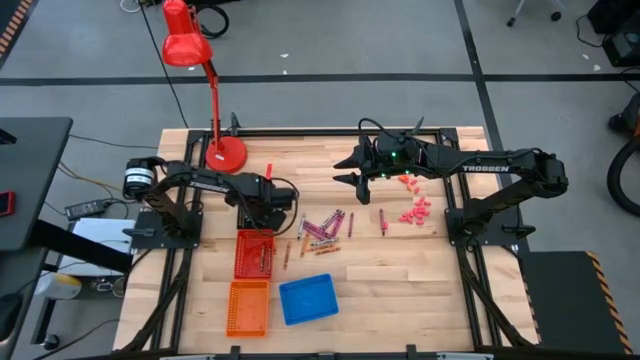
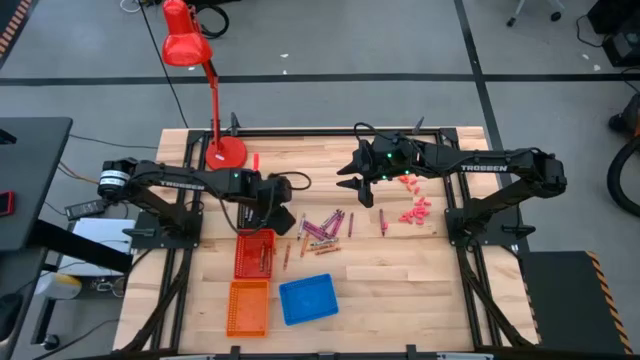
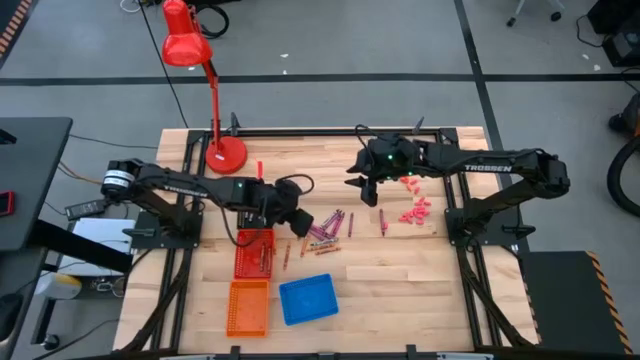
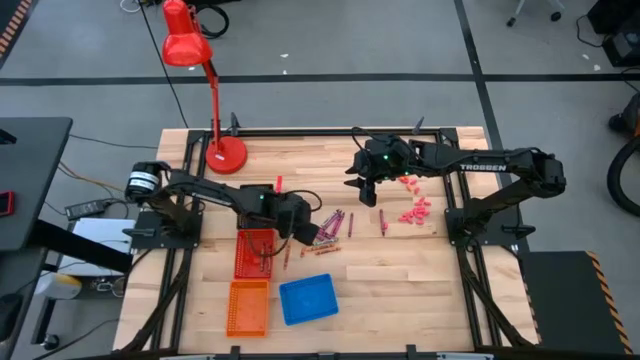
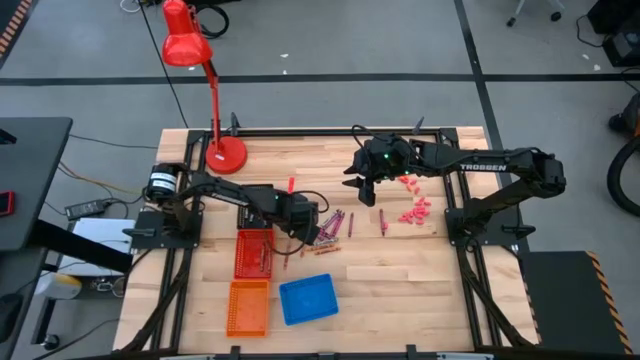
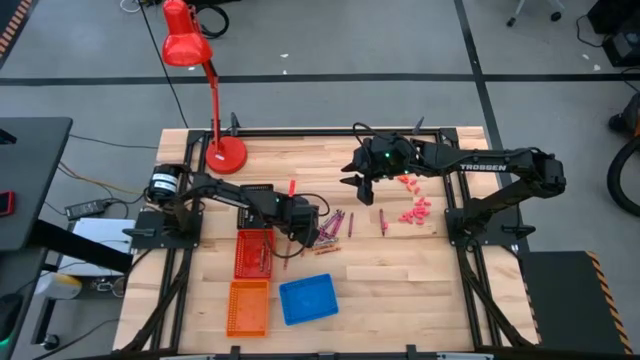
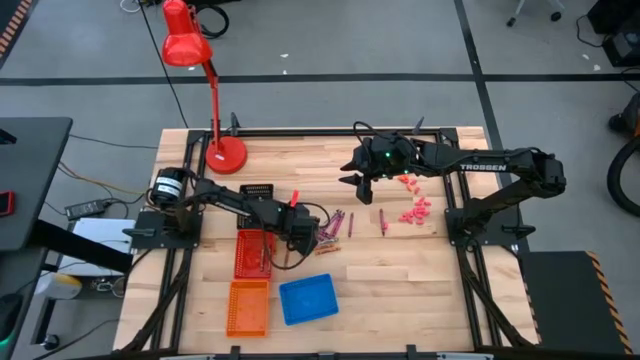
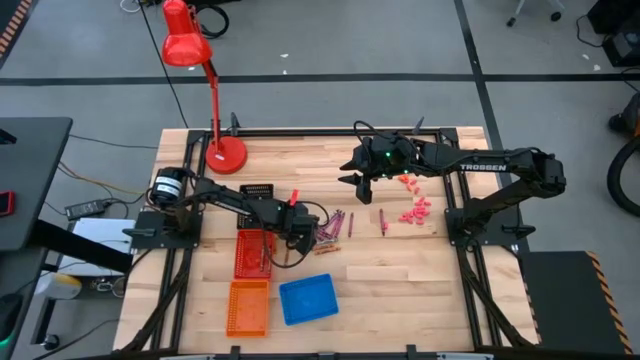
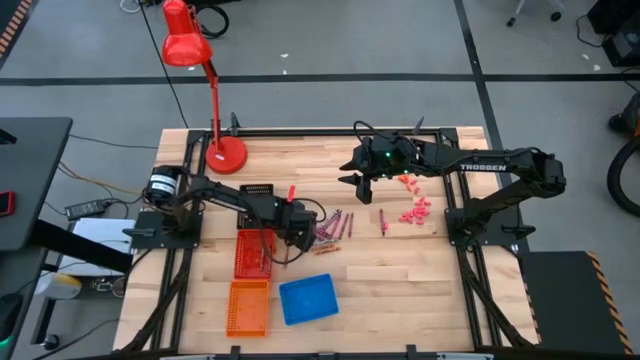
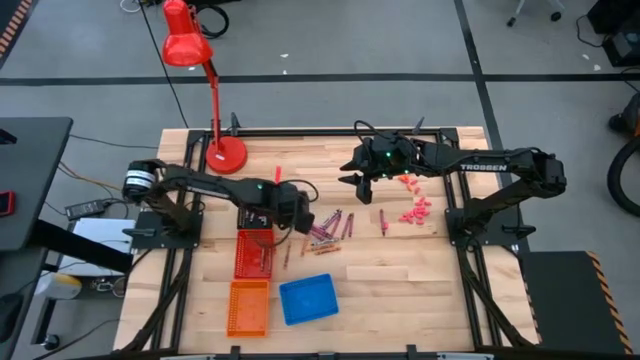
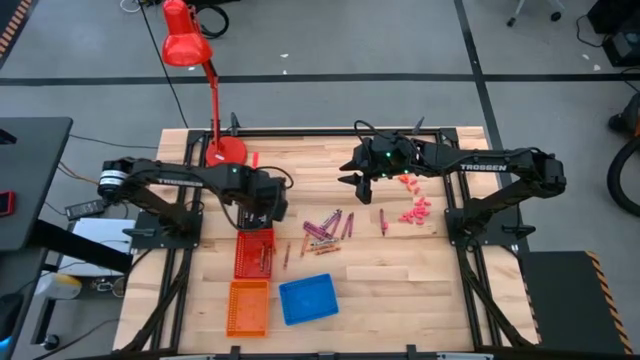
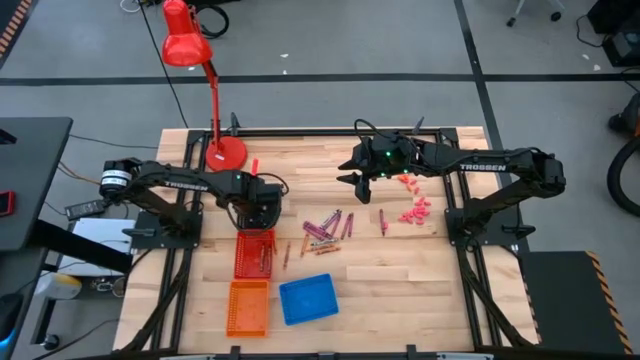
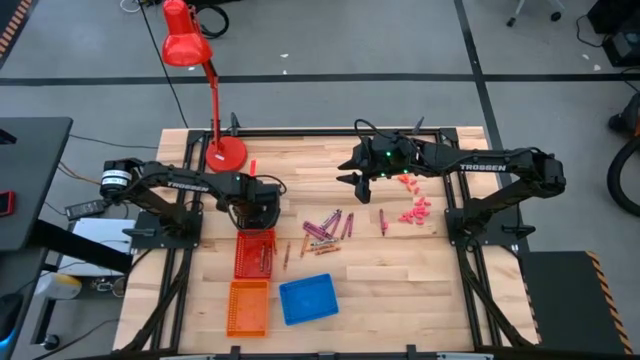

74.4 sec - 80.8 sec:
Task: Sort crayons
Put the black crayon into the black bin

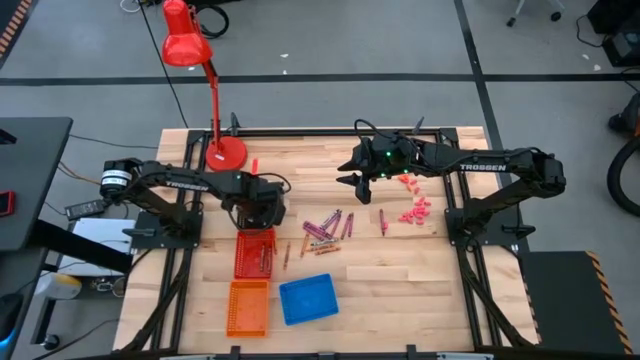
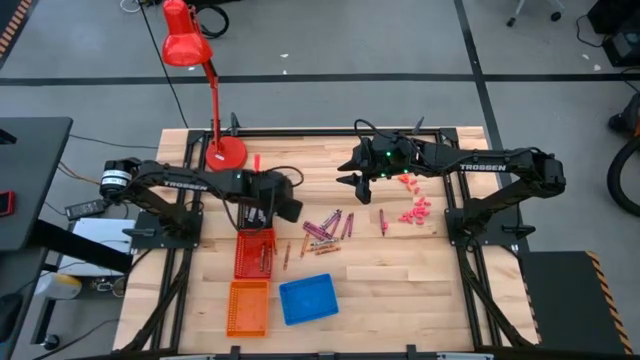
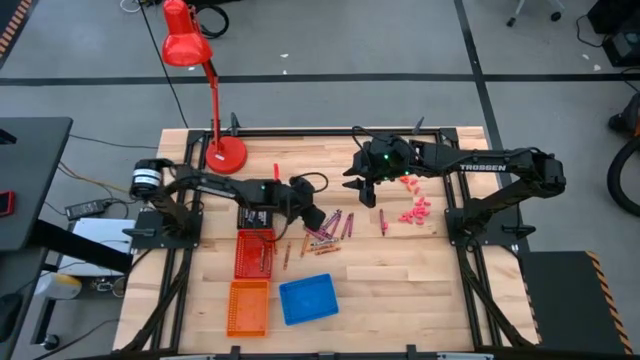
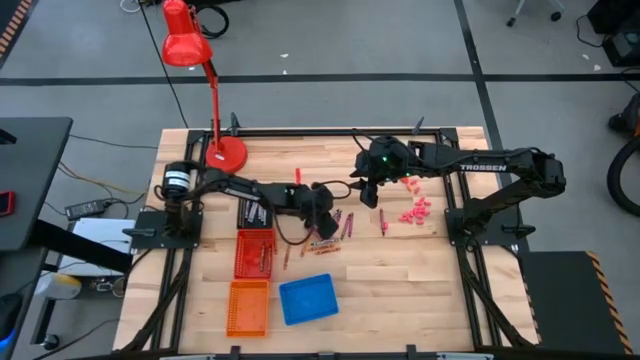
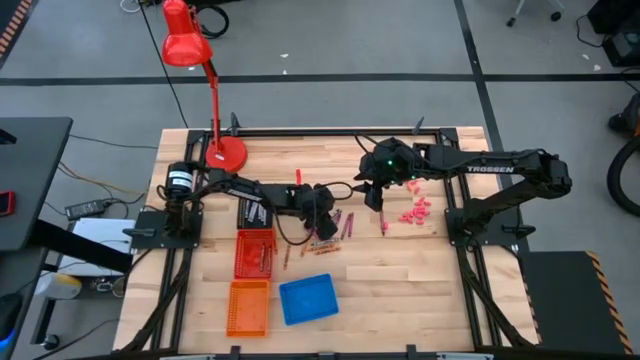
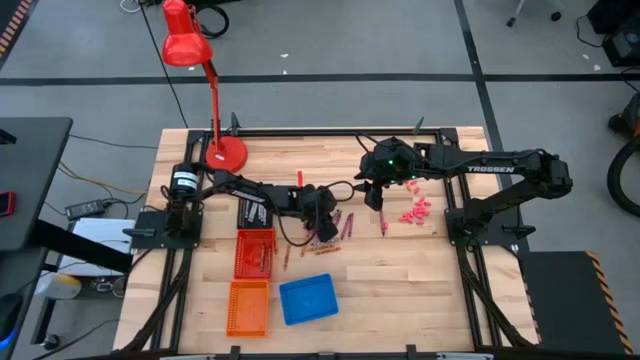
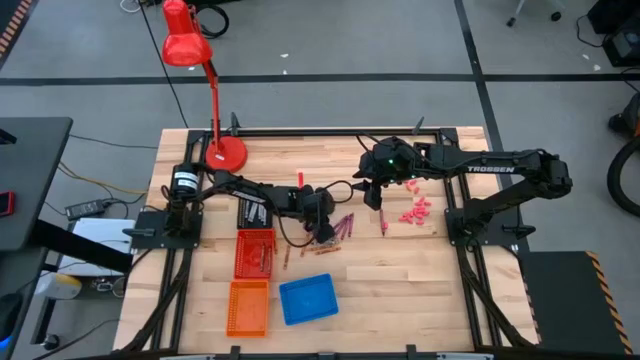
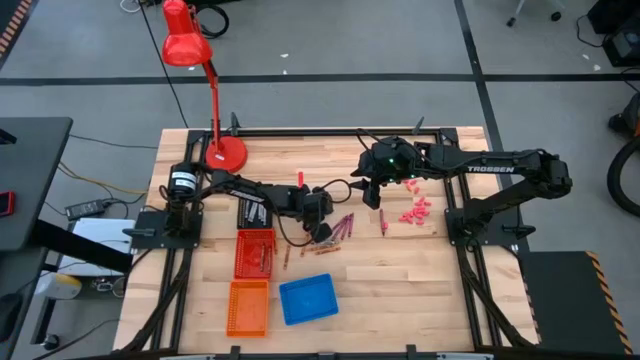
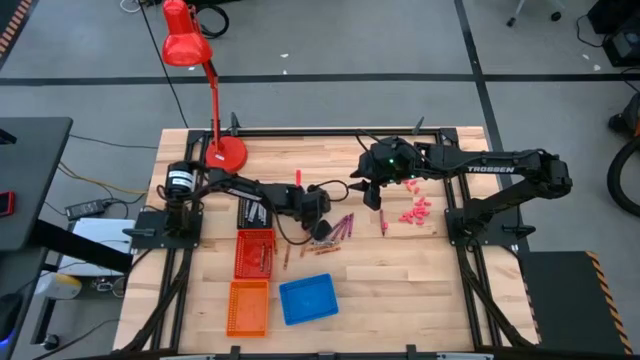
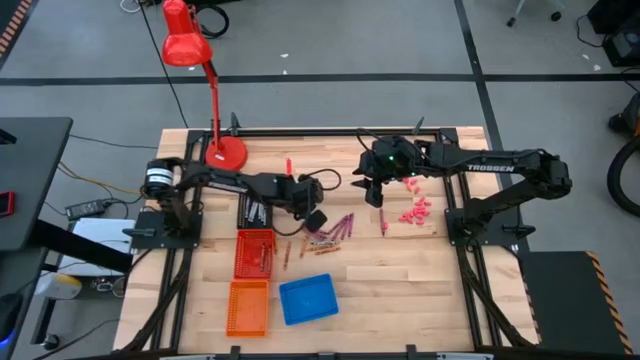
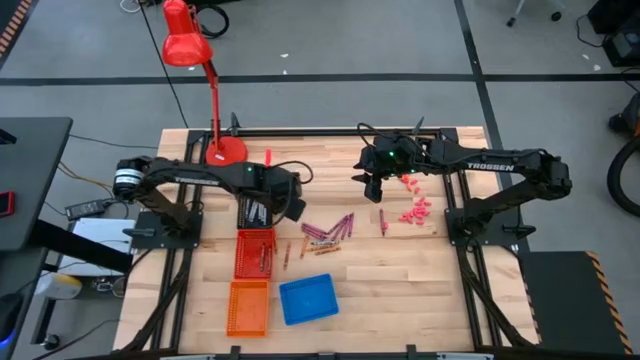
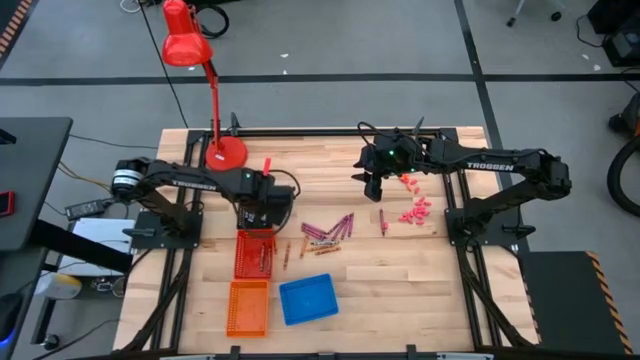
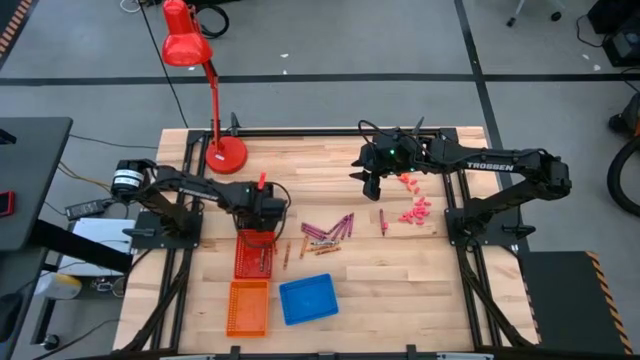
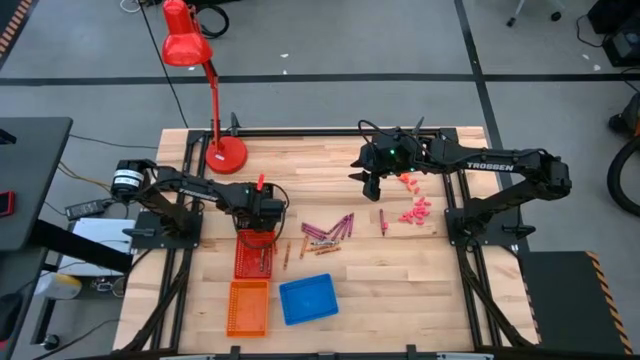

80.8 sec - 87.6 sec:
Put the black crayon into the black bin

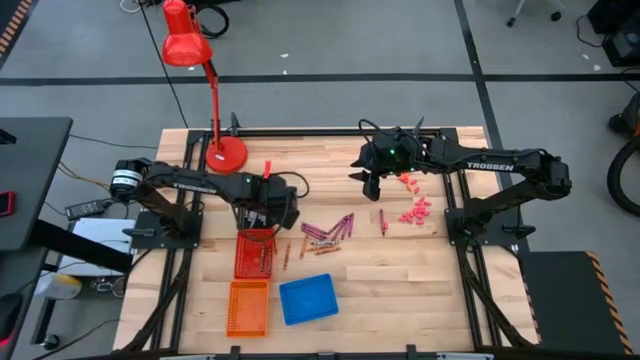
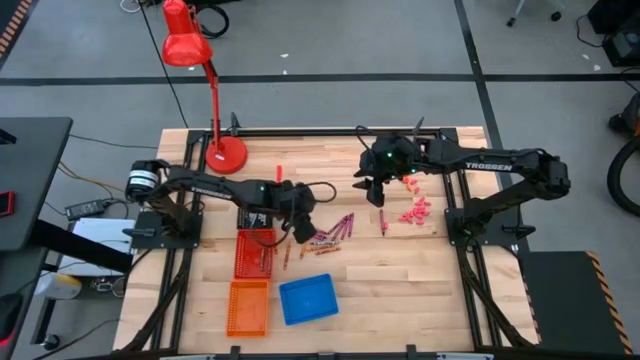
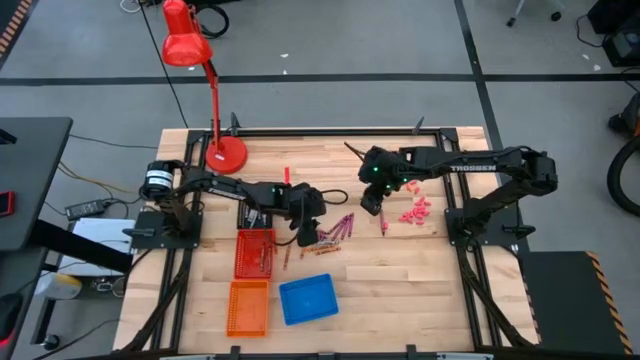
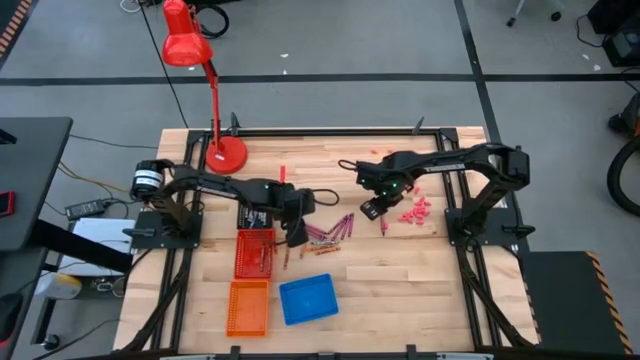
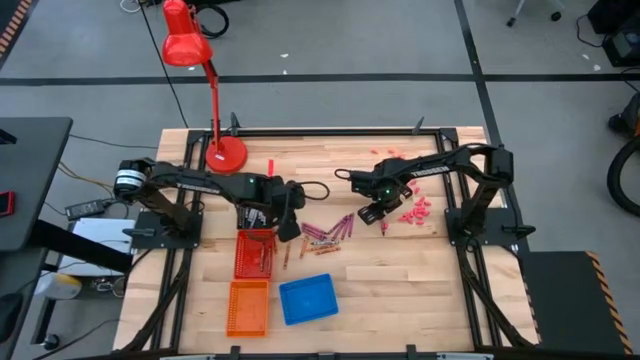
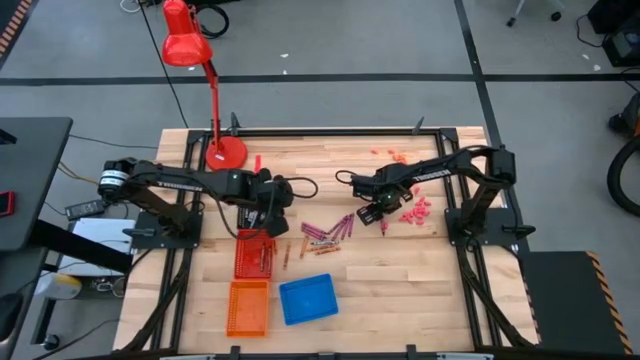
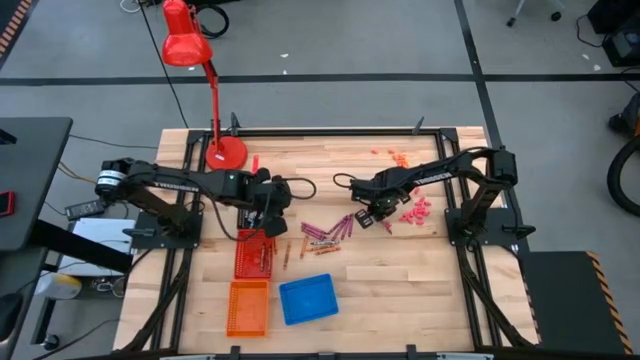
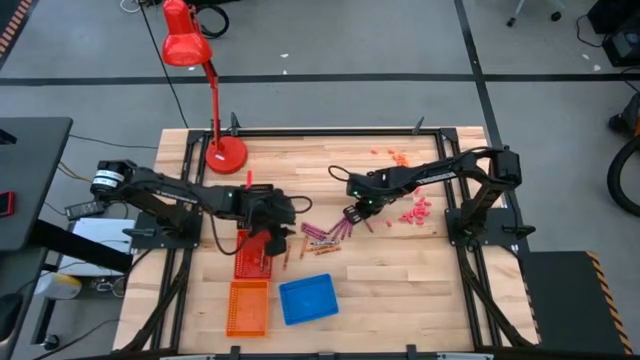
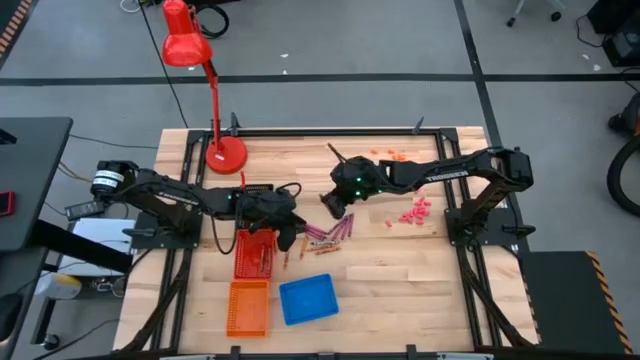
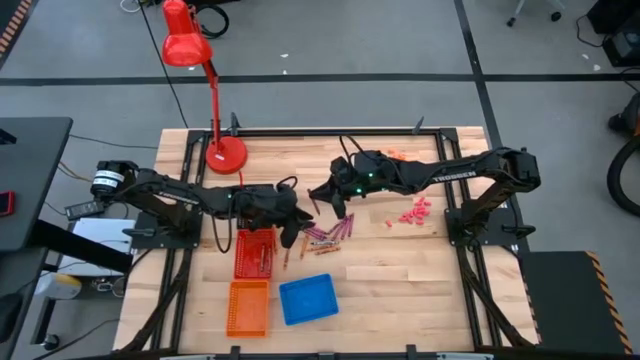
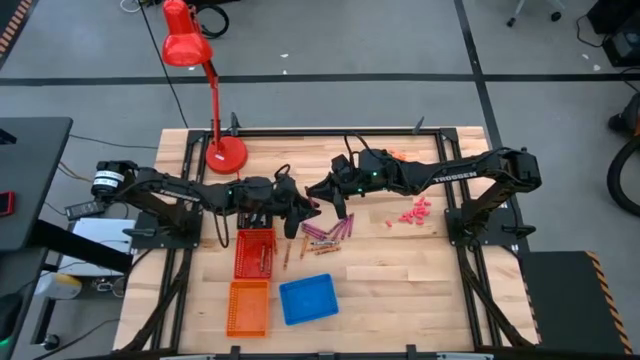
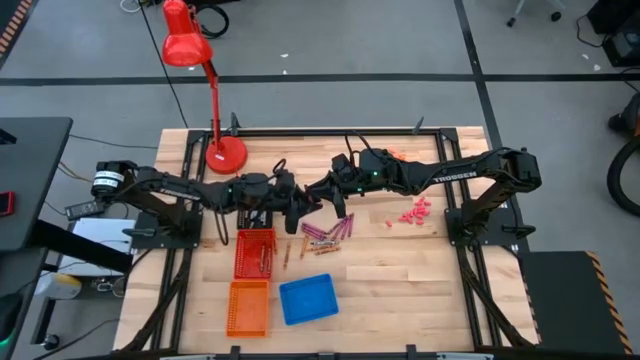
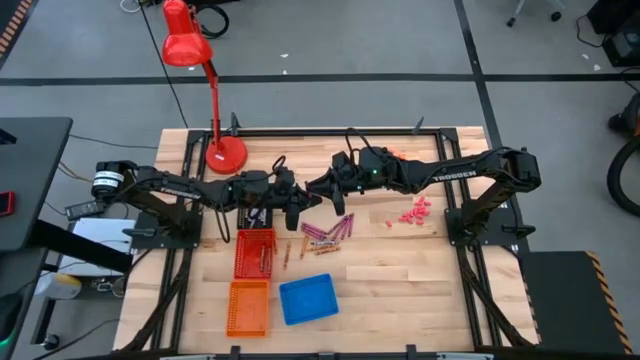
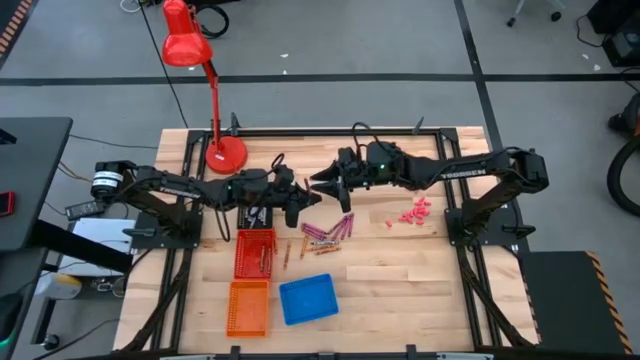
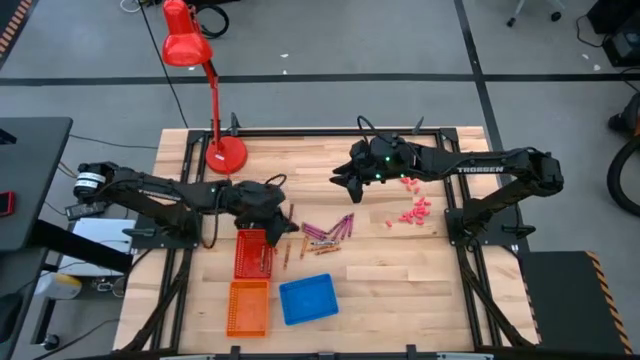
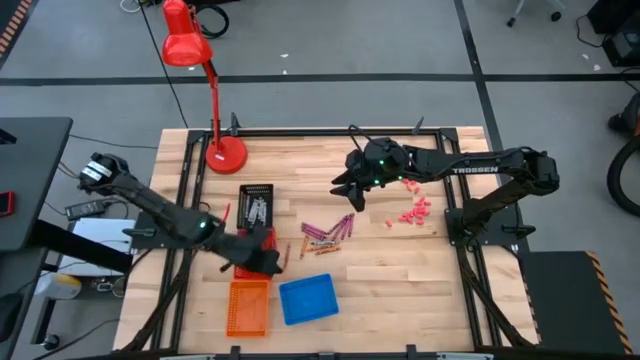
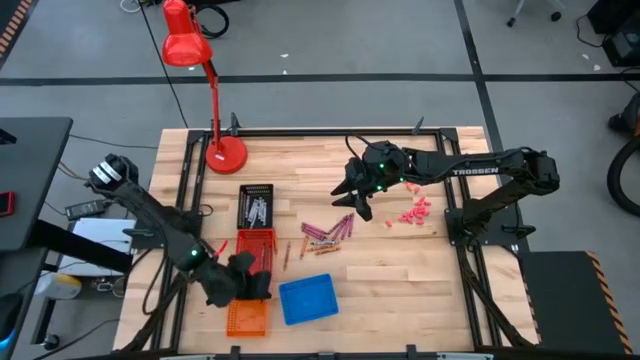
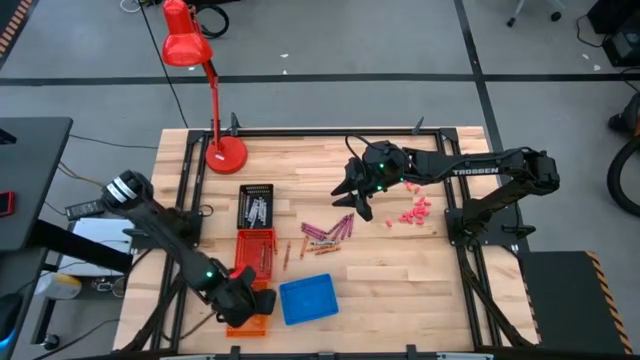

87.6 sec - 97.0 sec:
Put the red crayon into the orange bin
